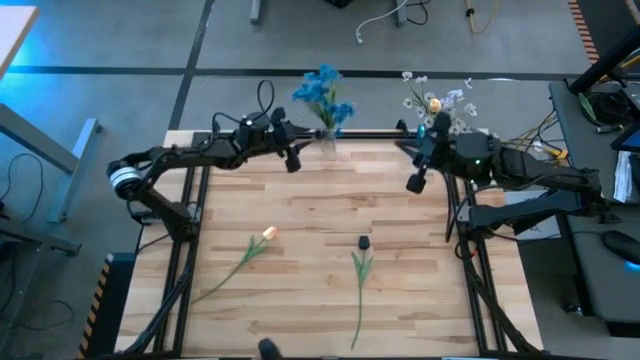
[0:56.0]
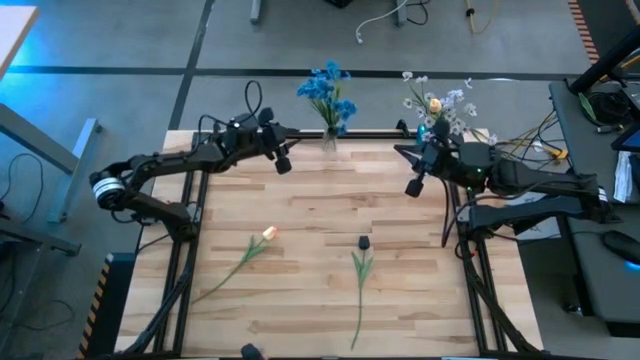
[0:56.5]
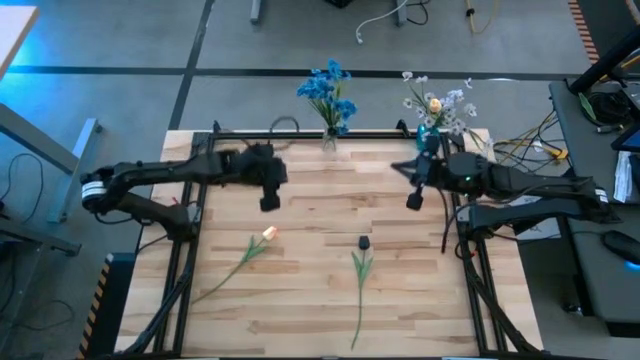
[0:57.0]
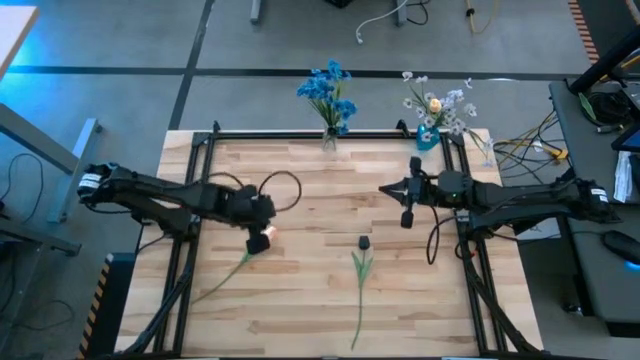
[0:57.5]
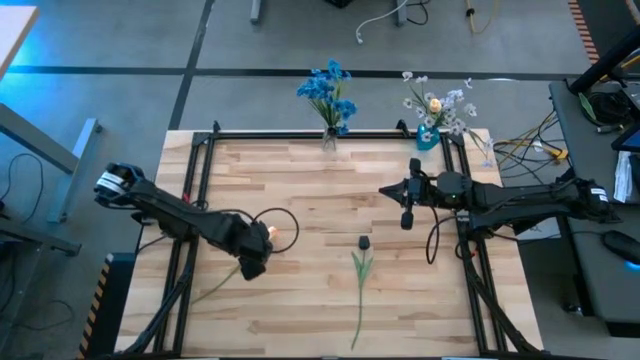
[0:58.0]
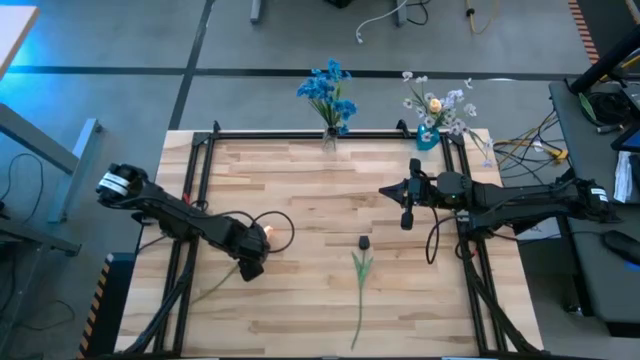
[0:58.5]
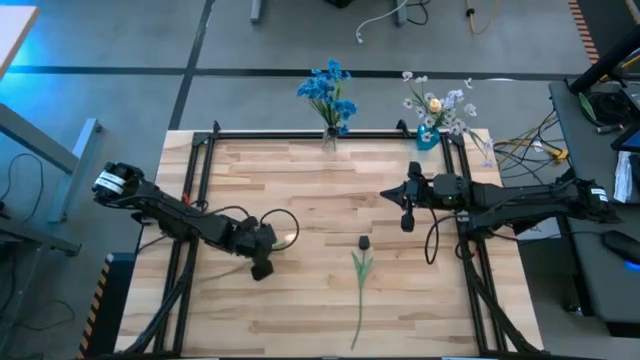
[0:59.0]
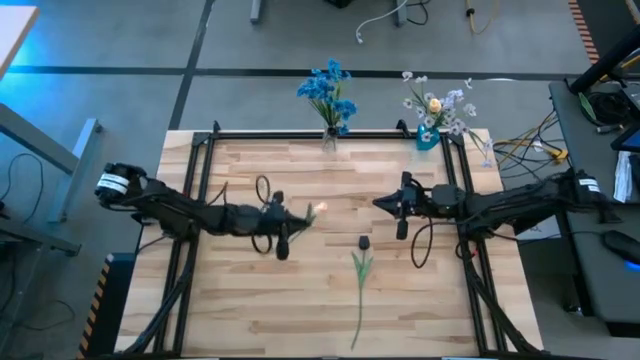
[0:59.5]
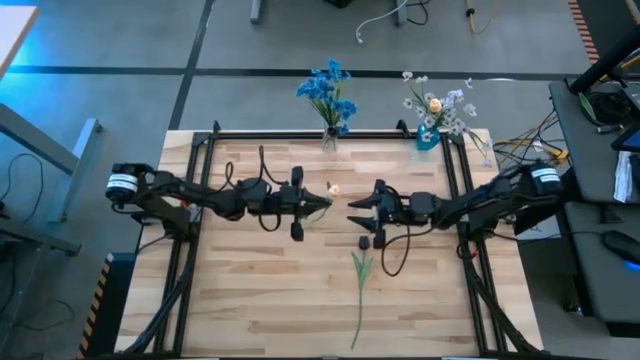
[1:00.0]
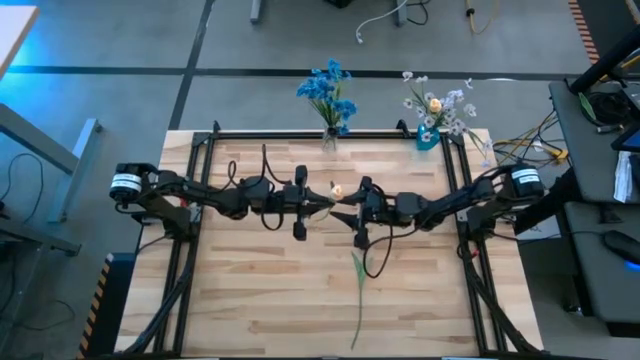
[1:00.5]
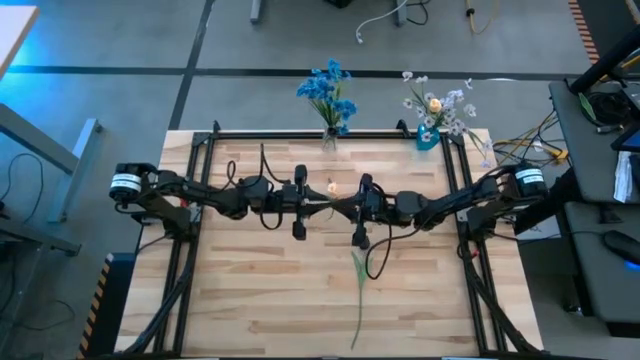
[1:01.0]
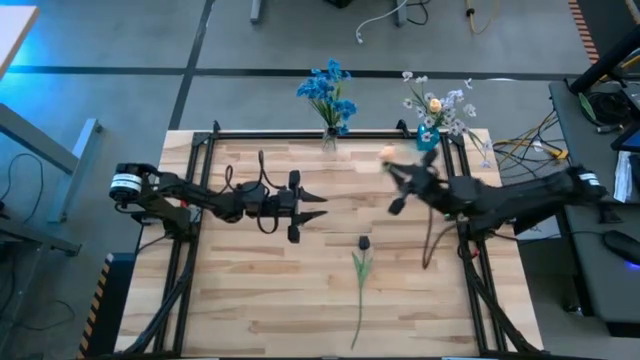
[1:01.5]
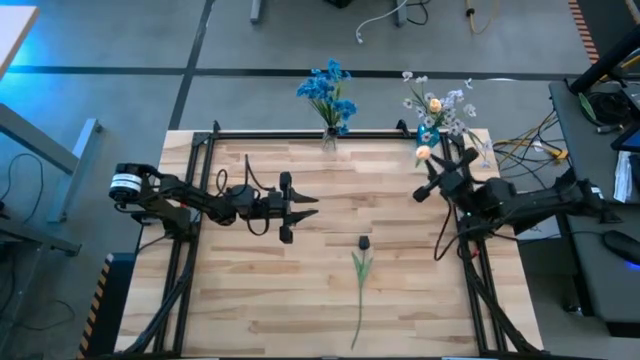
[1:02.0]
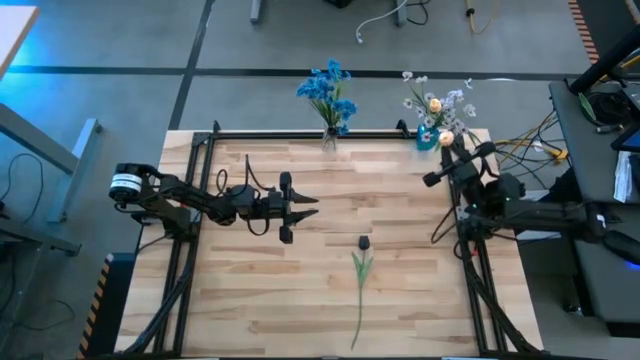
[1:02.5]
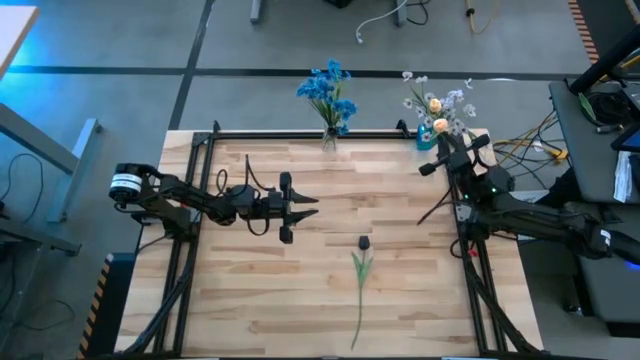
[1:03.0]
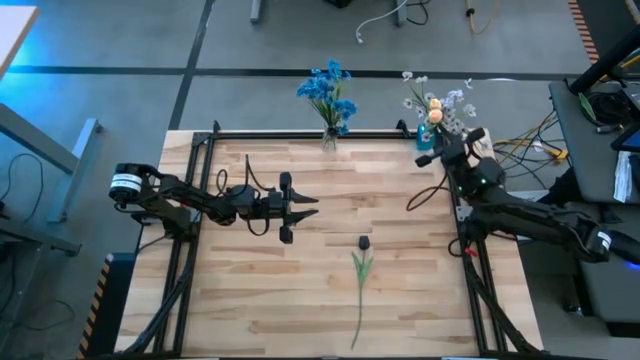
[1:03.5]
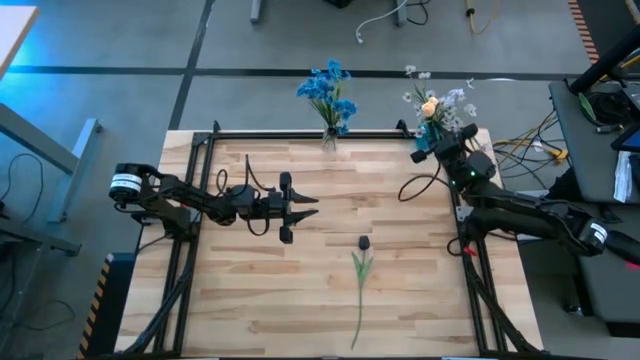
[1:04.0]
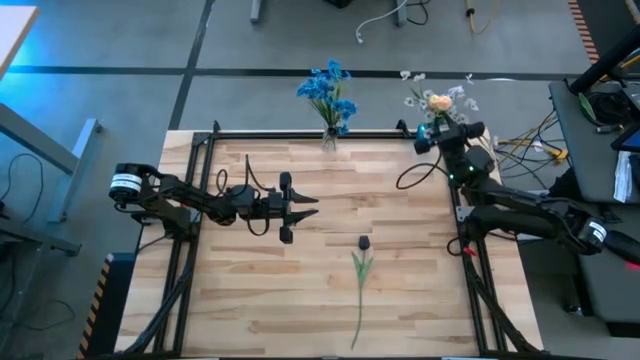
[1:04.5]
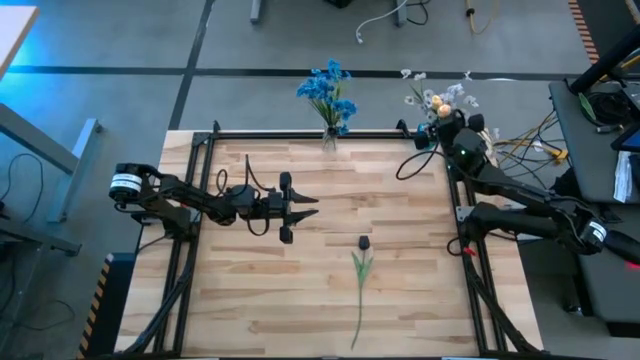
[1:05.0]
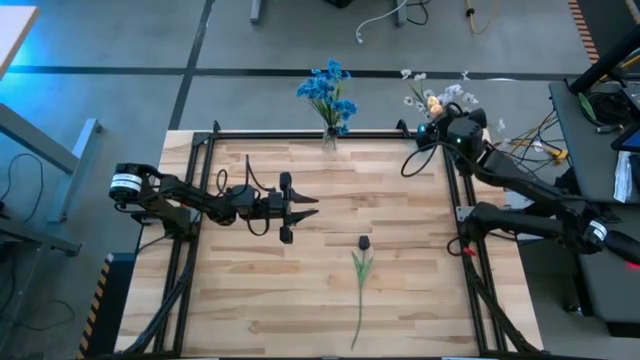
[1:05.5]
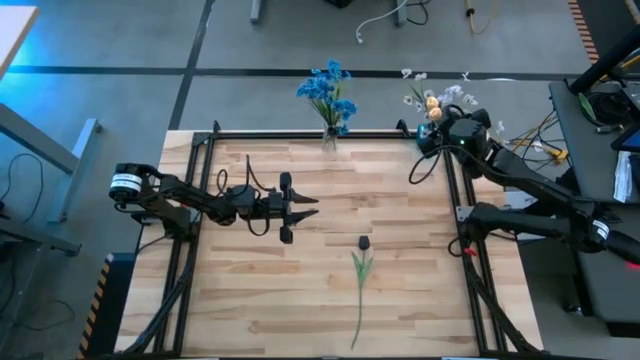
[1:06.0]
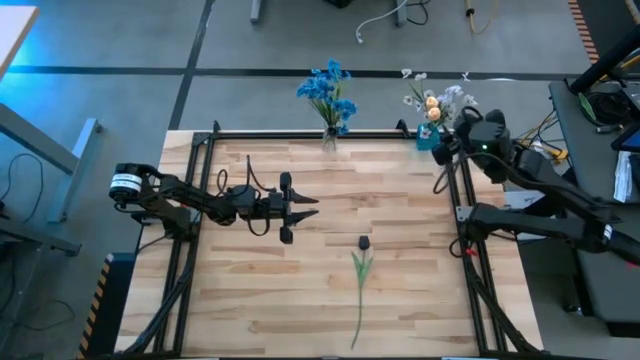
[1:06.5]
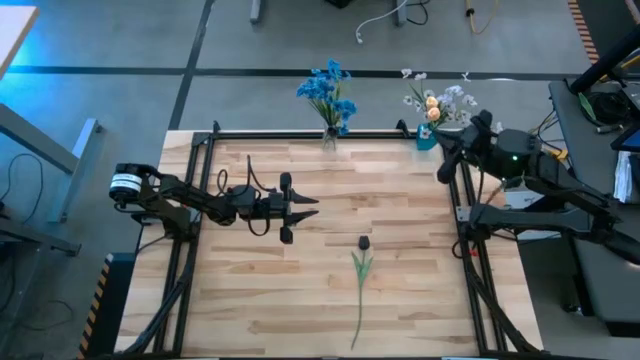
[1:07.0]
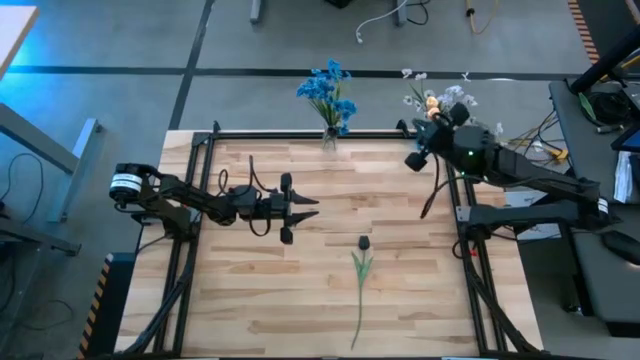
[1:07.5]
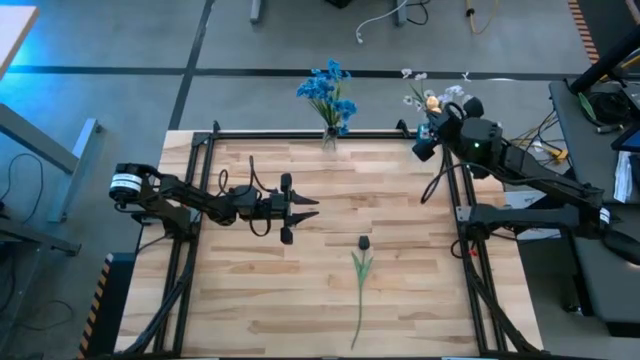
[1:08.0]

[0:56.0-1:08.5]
Task: Sort flowers into vase by color
Put the light orange tulip into the blue vase

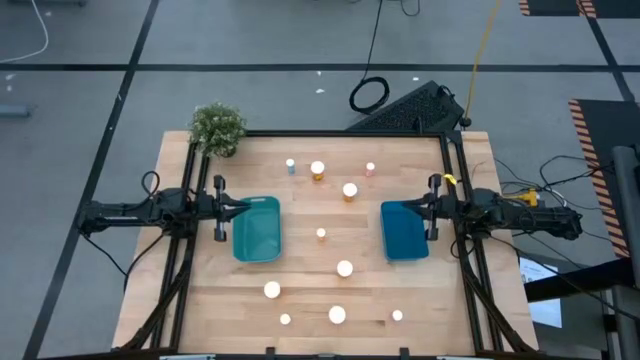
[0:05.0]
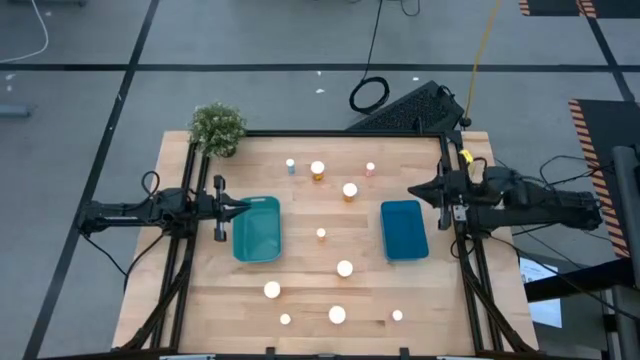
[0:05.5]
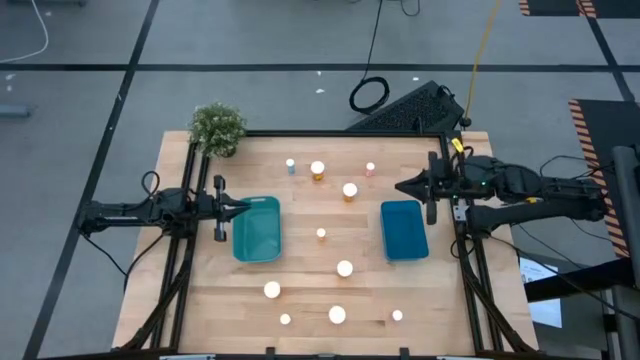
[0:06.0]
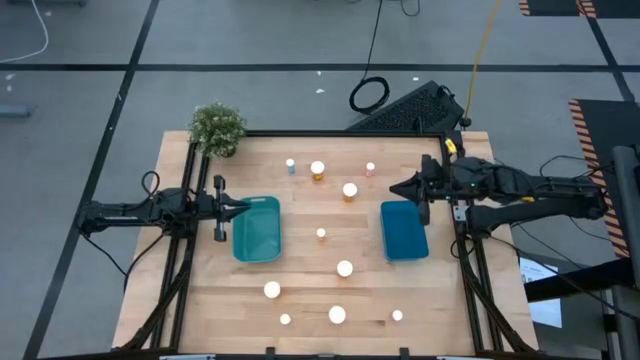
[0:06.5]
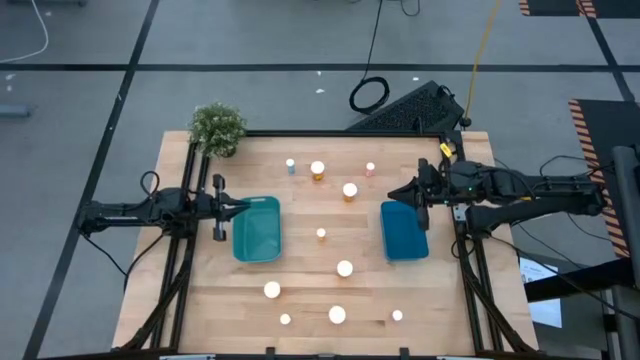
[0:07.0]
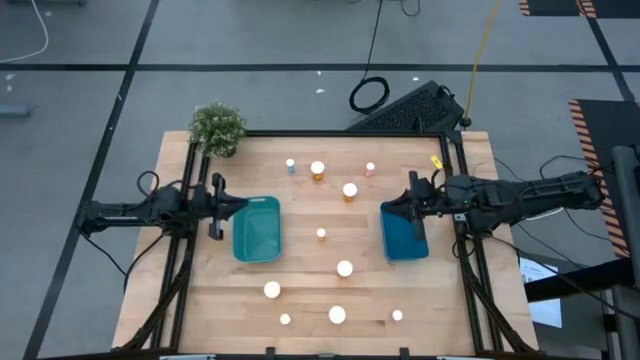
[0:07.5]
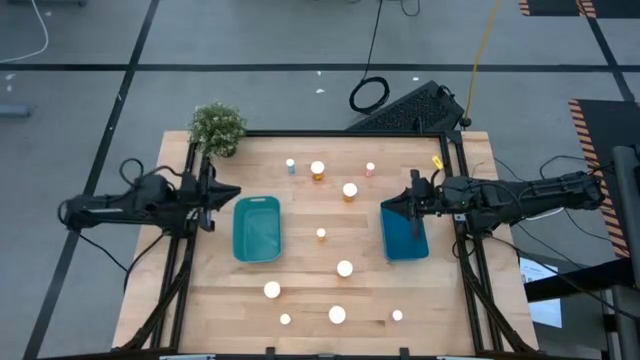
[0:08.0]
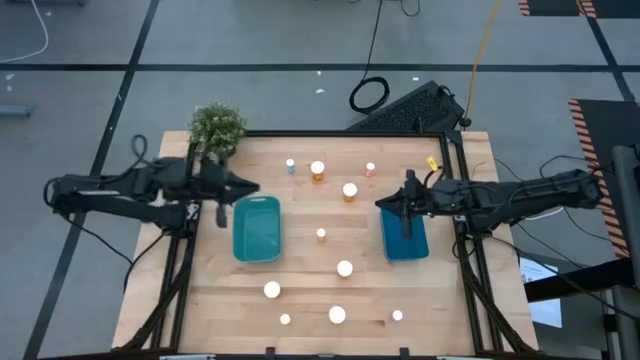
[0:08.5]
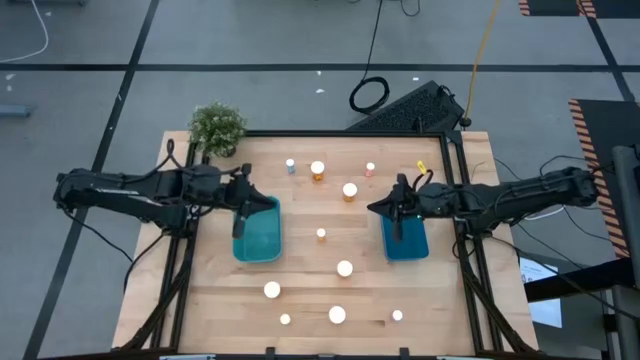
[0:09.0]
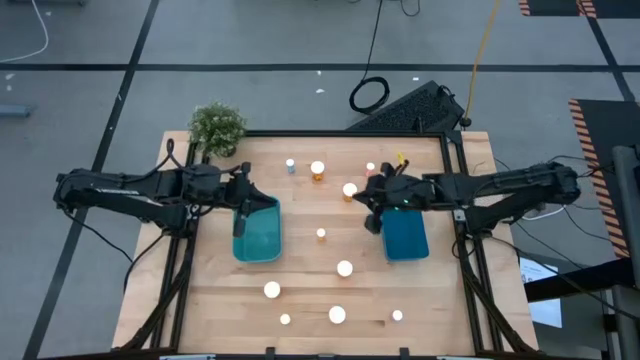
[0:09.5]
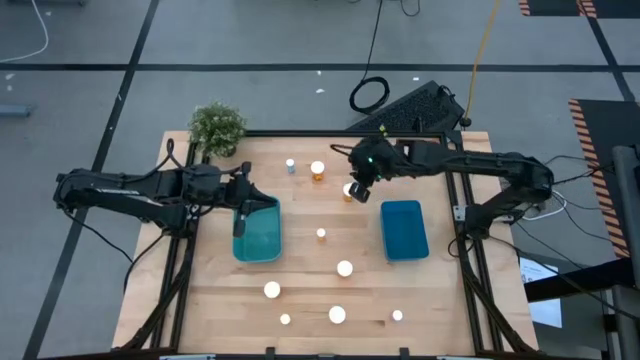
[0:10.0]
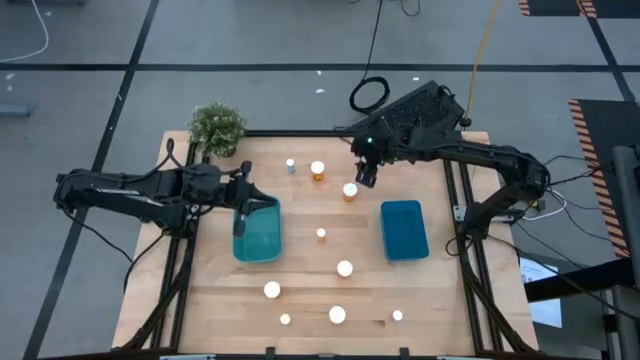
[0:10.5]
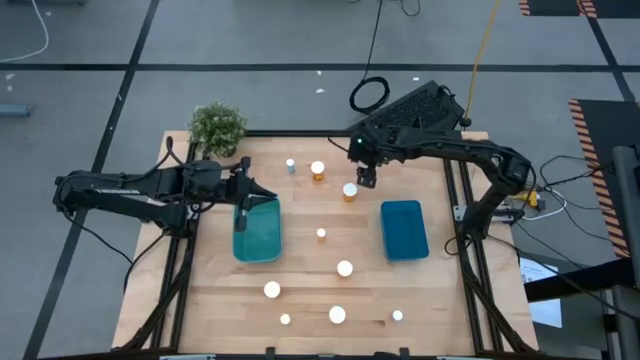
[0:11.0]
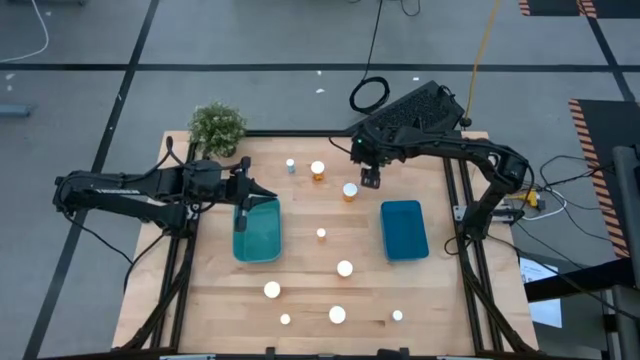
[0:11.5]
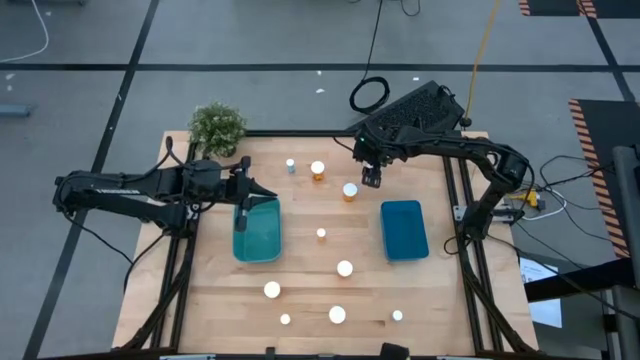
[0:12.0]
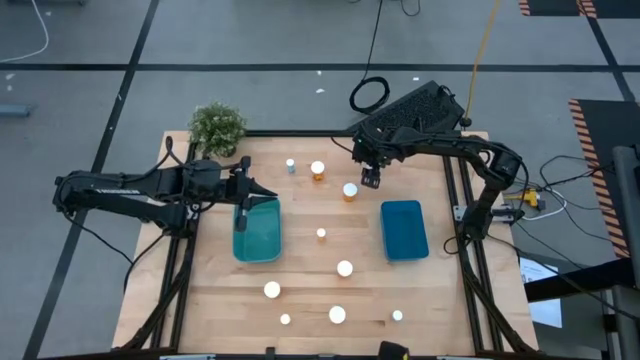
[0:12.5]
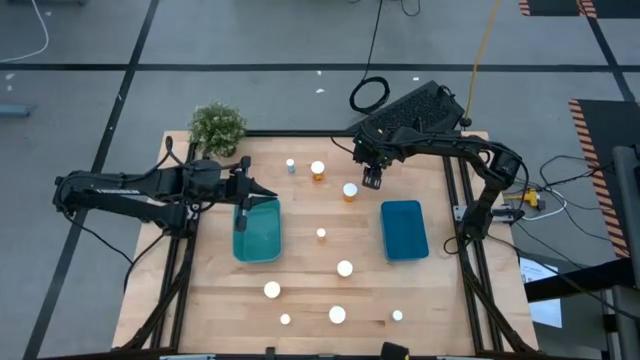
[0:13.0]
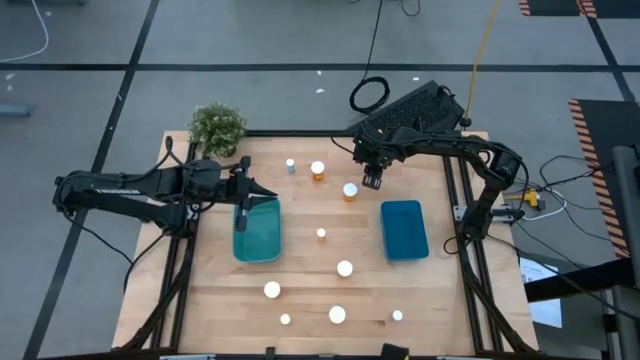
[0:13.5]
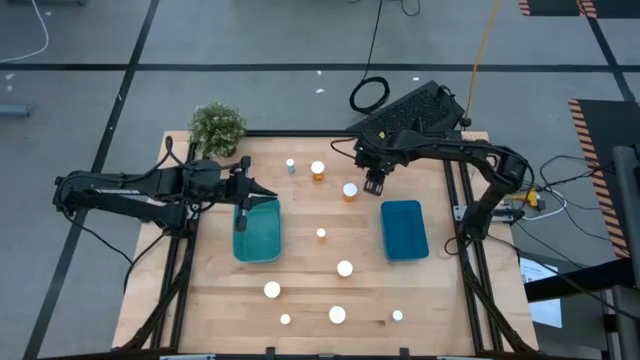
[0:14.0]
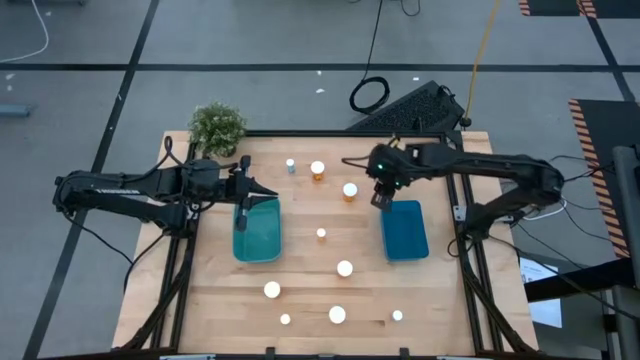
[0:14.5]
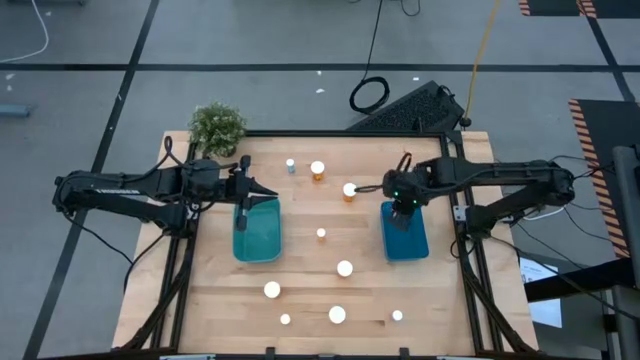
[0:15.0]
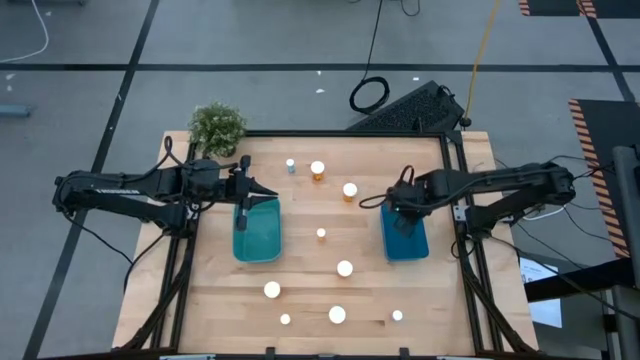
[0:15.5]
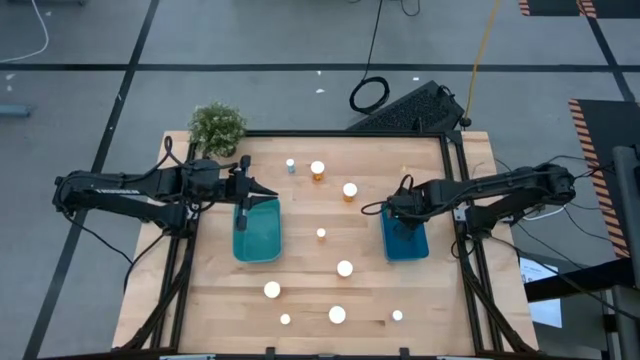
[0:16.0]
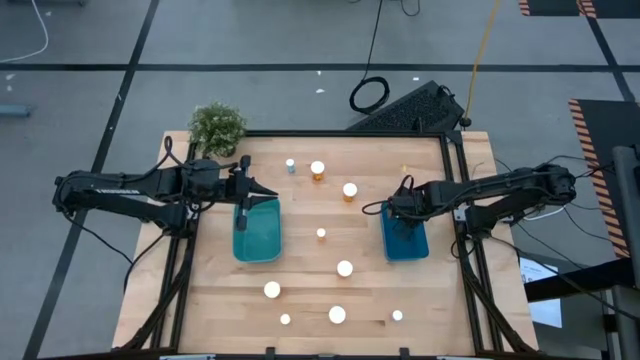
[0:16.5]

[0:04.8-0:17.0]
Task: Pick and place medicine bottles into bin by pill shape (circle, oval)
Put the light orange tablet bottle into the blue bin
